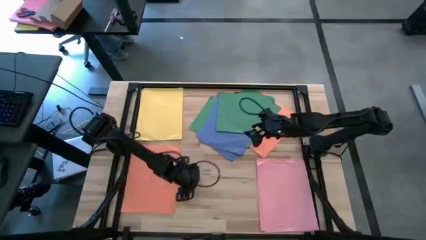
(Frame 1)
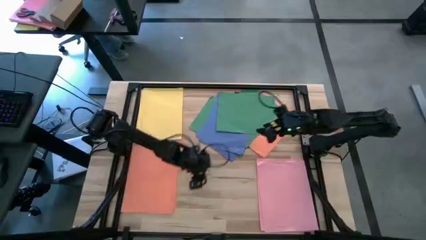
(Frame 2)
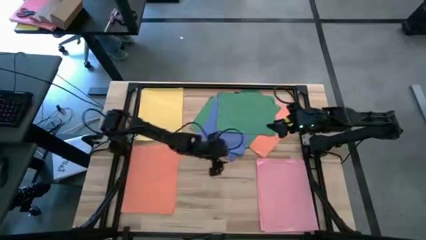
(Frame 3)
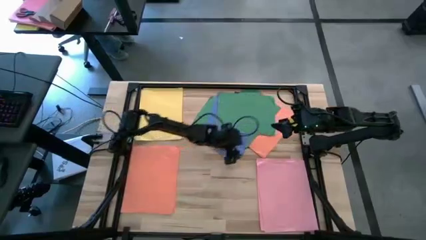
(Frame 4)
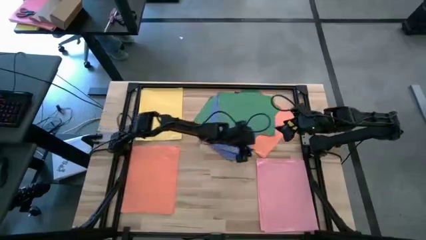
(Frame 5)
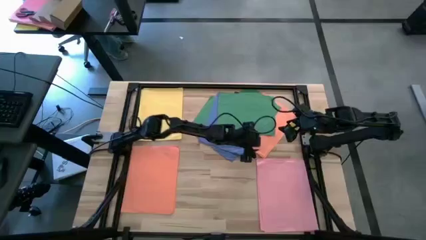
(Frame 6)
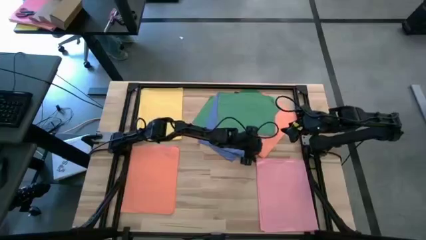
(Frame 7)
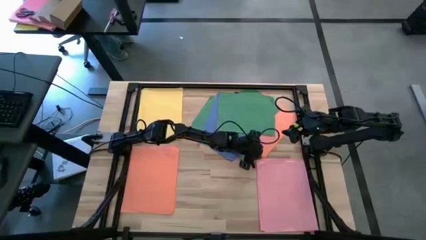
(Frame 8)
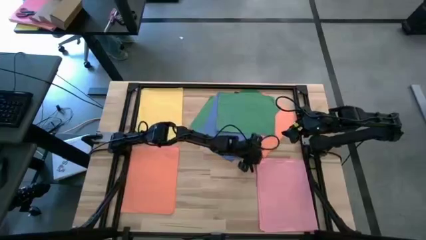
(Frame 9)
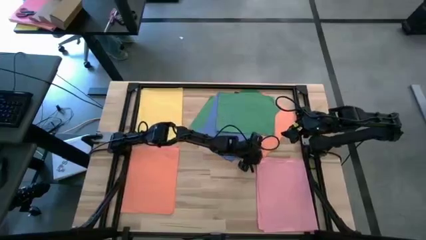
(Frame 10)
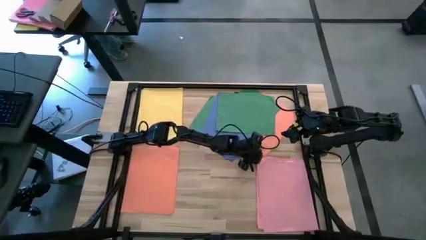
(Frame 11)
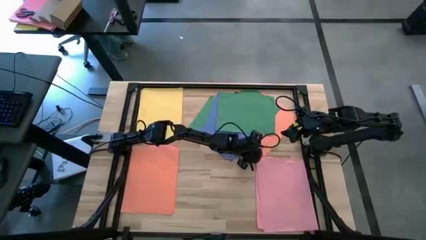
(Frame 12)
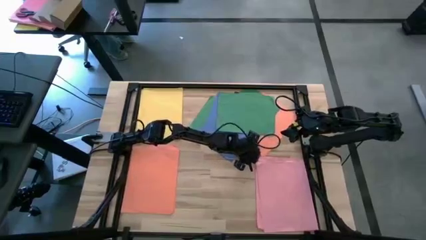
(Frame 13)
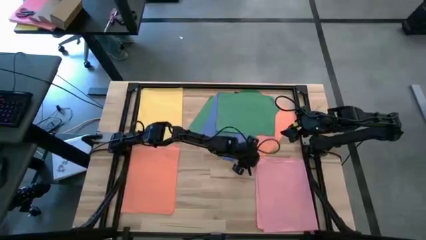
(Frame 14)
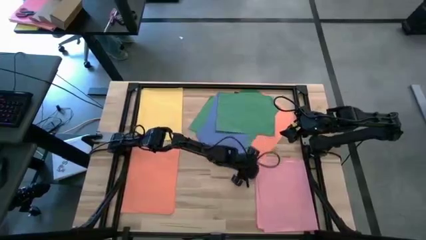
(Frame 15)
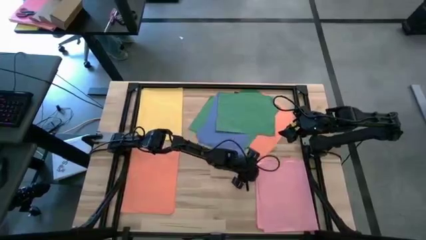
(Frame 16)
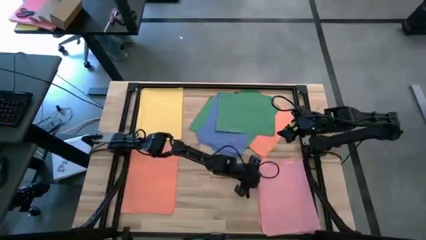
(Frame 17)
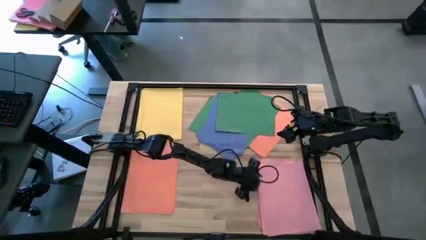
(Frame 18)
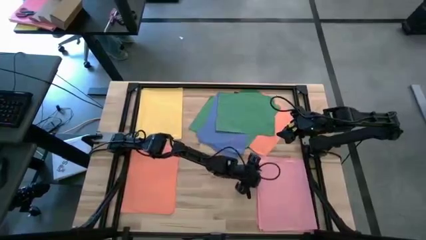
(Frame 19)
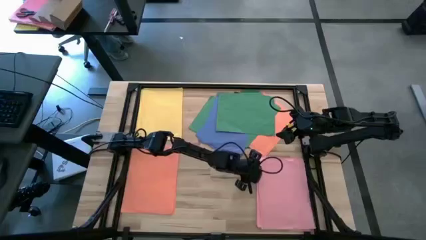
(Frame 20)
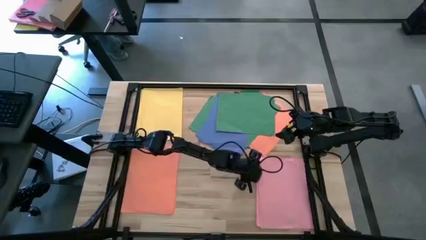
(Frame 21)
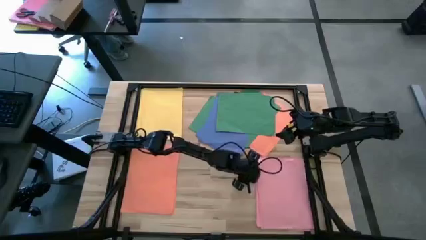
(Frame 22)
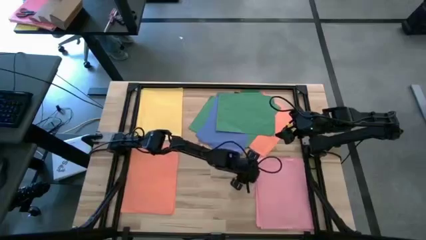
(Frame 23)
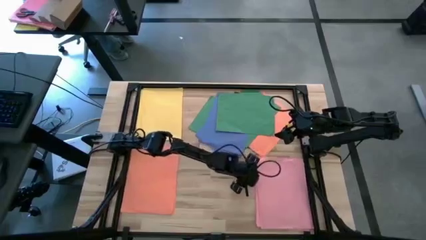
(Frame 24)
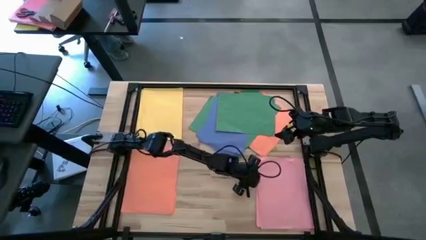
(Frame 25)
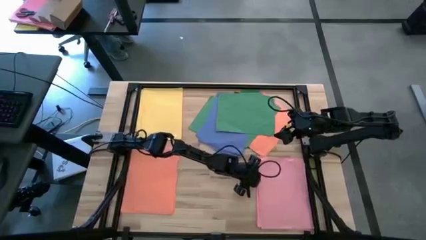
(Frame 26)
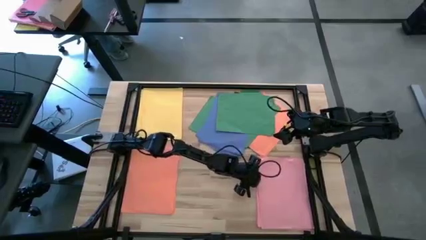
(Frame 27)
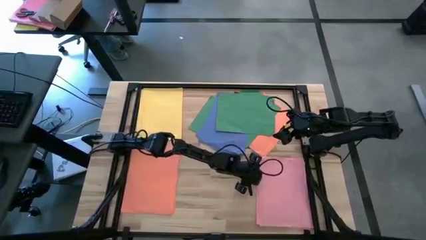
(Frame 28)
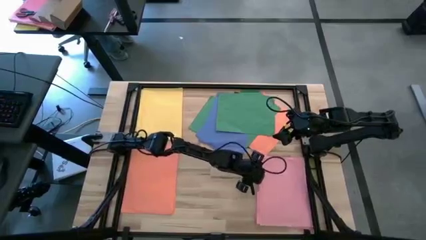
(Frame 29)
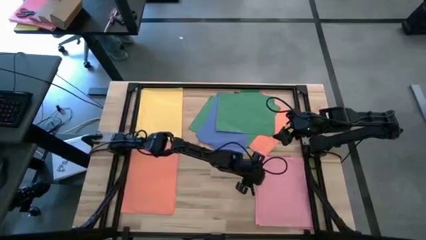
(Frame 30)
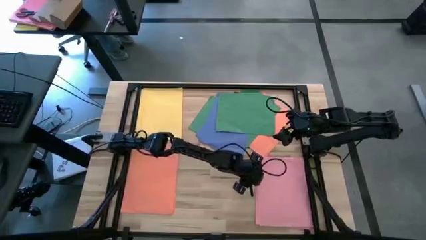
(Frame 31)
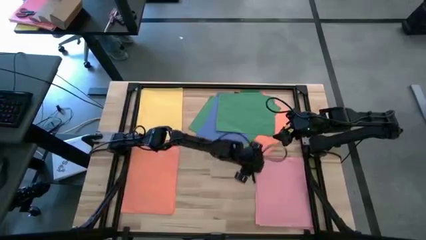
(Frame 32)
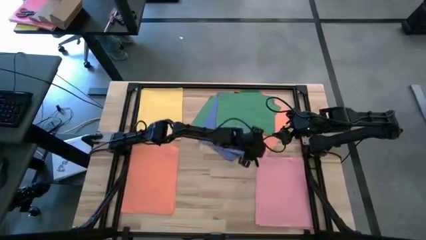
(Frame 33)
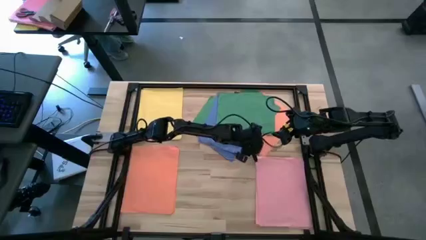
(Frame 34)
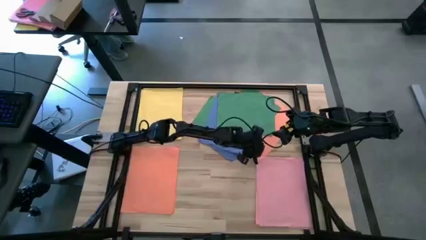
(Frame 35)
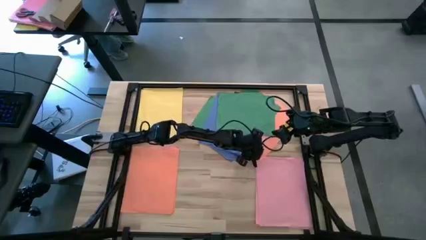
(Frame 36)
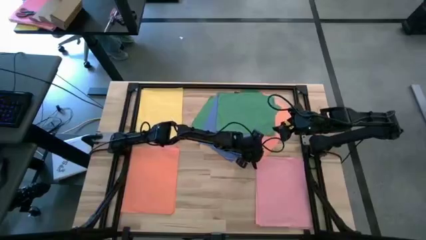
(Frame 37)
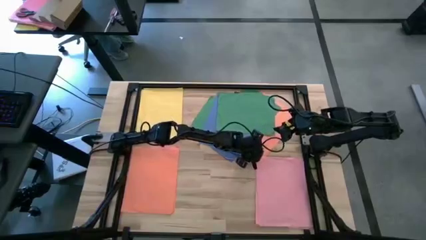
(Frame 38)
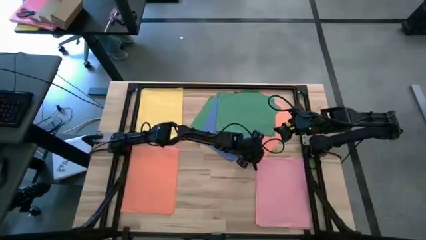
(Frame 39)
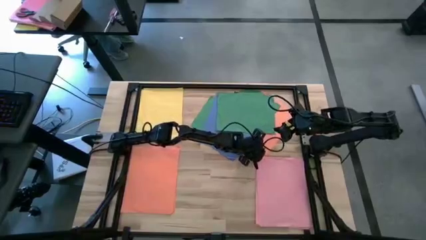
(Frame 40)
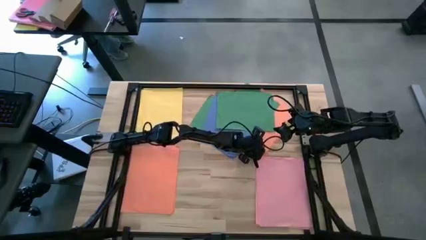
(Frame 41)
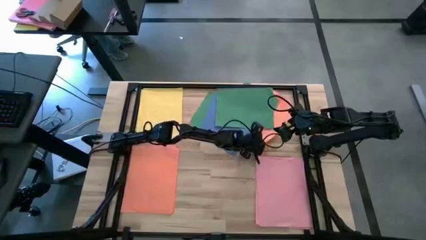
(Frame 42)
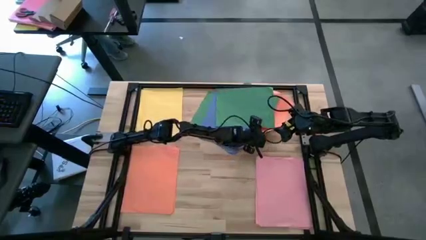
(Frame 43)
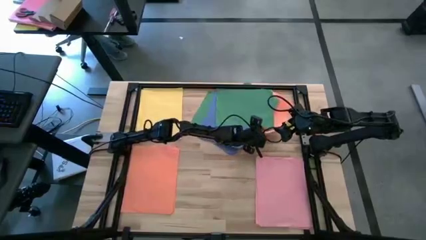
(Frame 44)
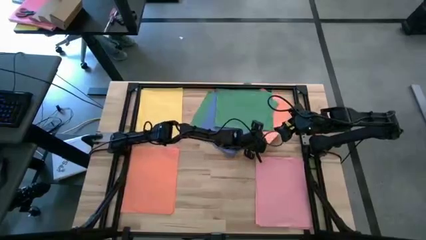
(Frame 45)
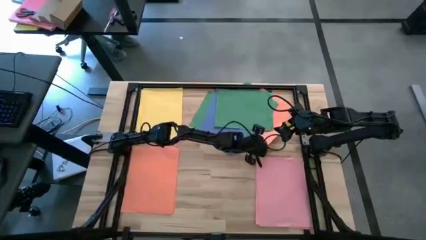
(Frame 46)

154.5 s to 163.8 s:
Task: Organize paper
Stack the orange paper on top of the stacked orange paper

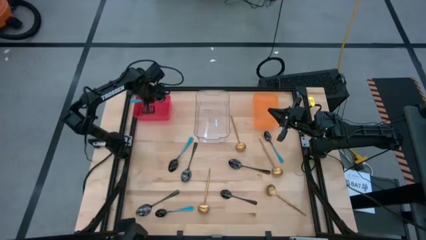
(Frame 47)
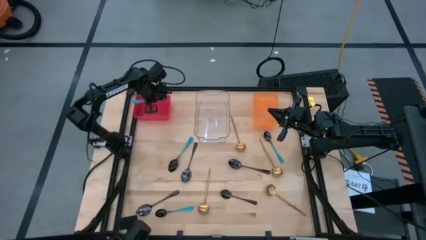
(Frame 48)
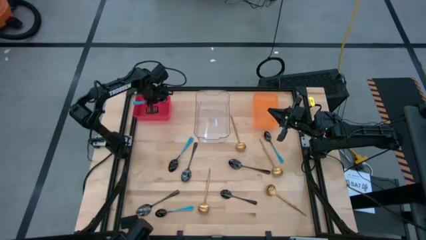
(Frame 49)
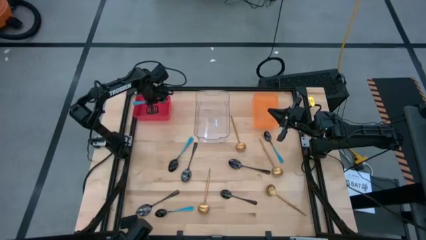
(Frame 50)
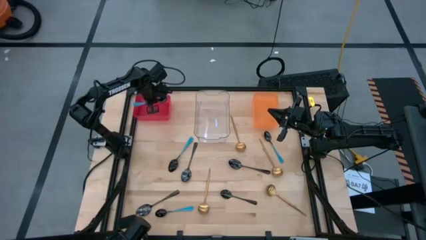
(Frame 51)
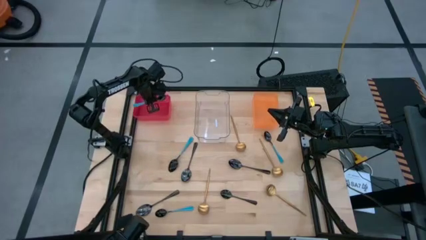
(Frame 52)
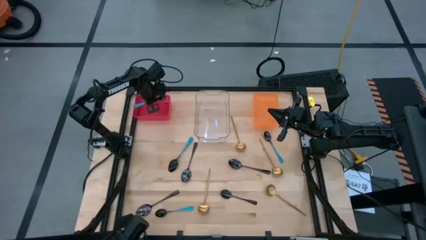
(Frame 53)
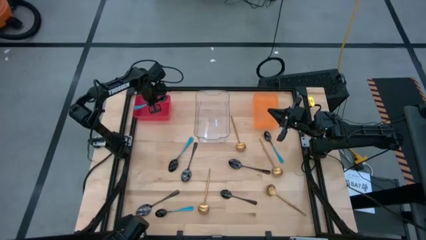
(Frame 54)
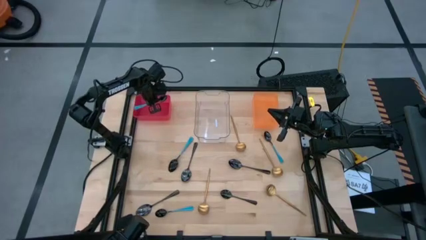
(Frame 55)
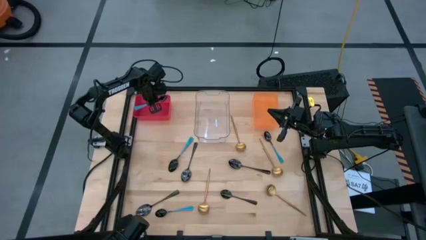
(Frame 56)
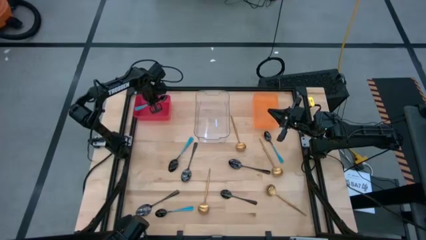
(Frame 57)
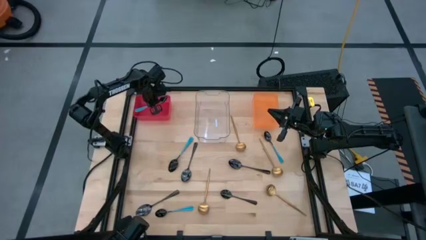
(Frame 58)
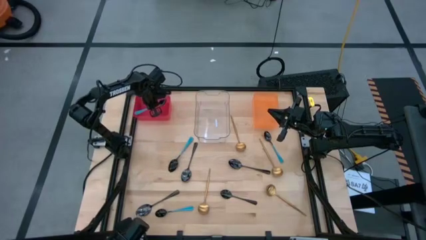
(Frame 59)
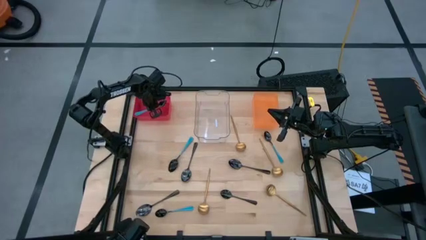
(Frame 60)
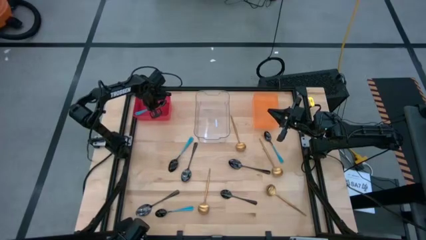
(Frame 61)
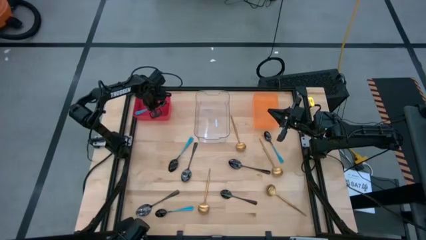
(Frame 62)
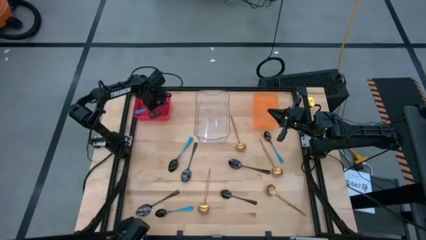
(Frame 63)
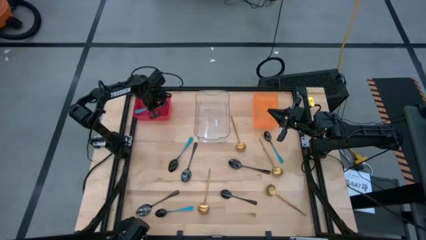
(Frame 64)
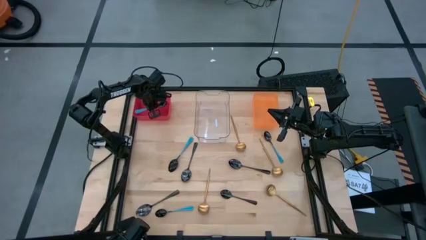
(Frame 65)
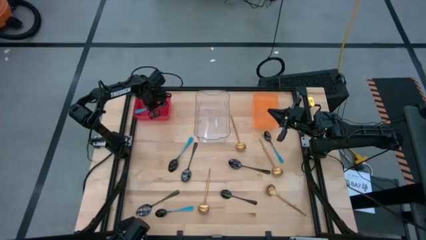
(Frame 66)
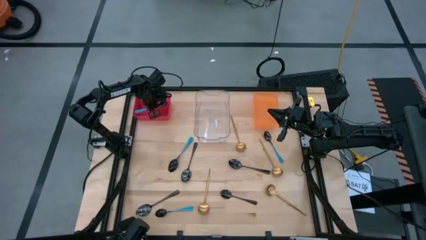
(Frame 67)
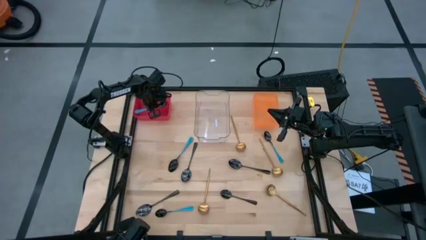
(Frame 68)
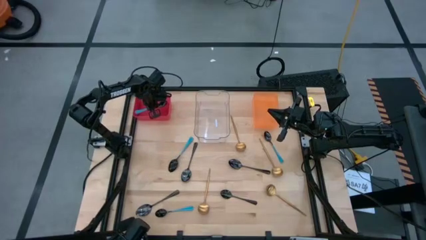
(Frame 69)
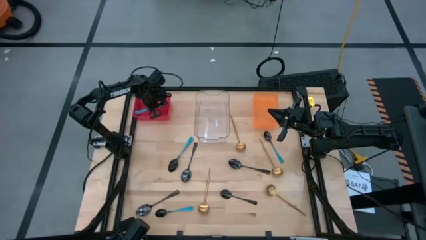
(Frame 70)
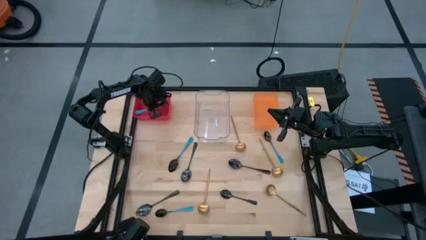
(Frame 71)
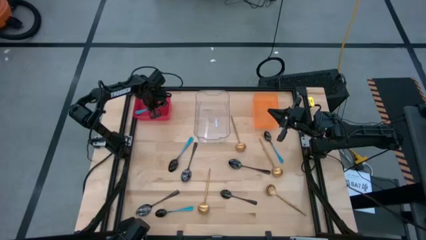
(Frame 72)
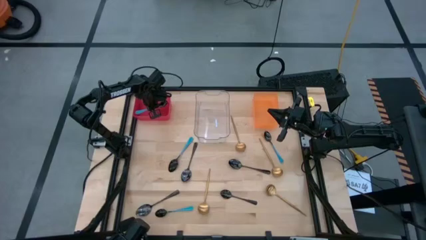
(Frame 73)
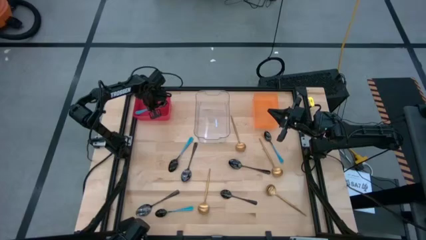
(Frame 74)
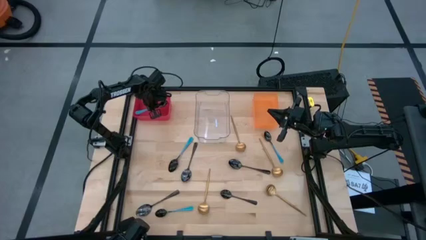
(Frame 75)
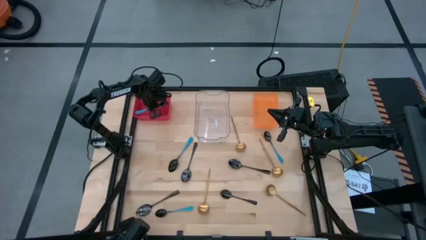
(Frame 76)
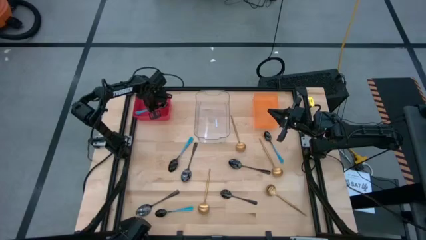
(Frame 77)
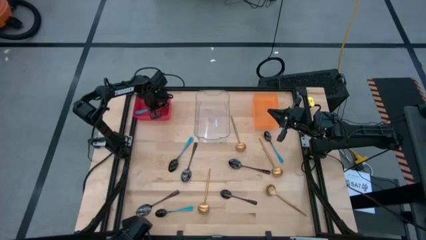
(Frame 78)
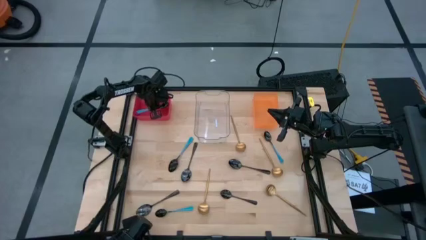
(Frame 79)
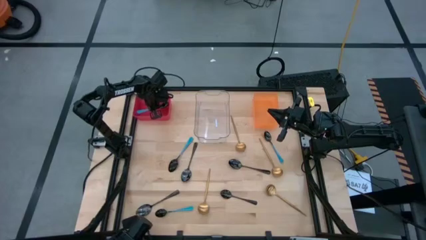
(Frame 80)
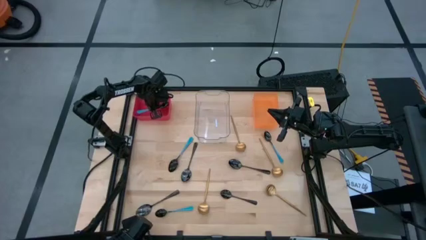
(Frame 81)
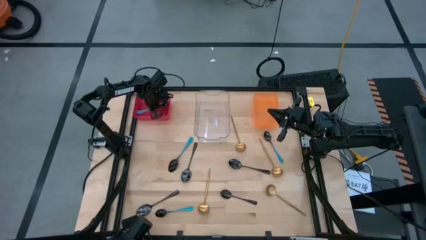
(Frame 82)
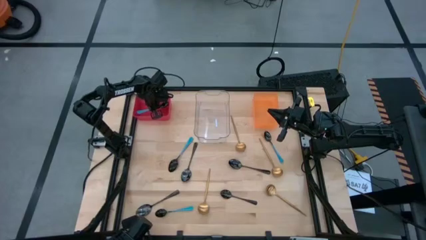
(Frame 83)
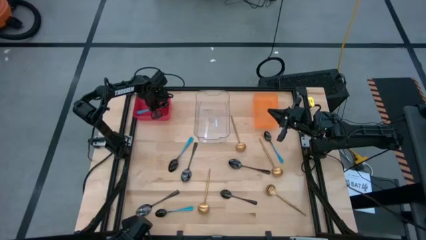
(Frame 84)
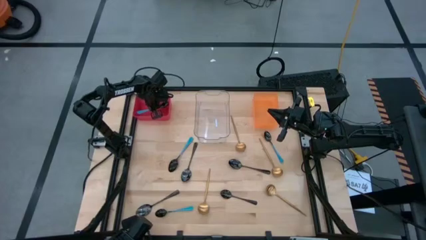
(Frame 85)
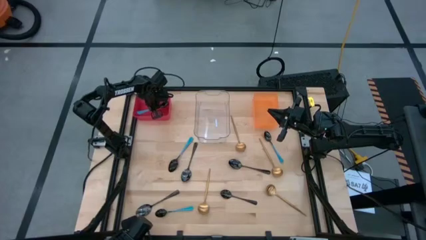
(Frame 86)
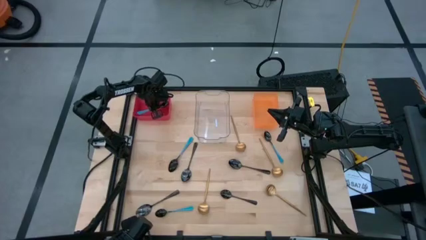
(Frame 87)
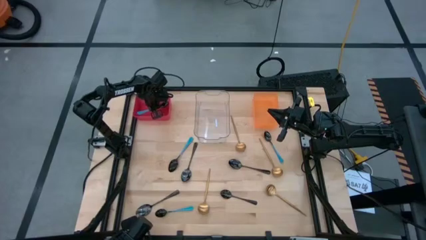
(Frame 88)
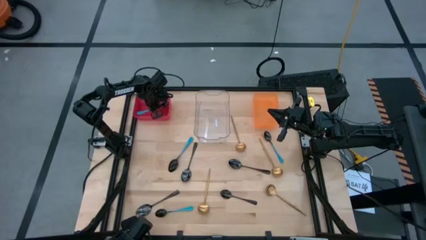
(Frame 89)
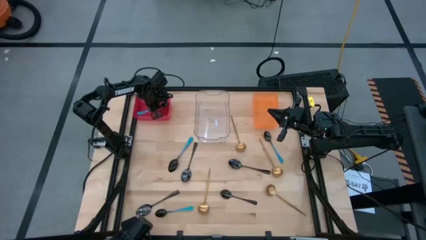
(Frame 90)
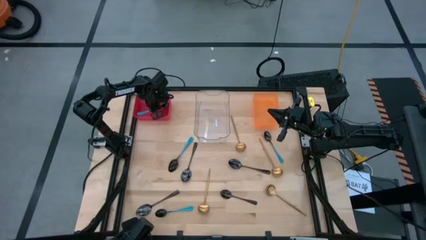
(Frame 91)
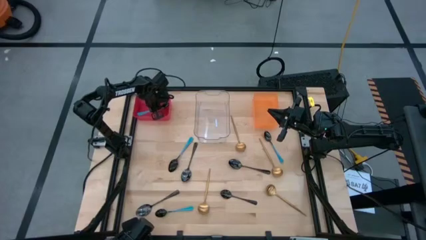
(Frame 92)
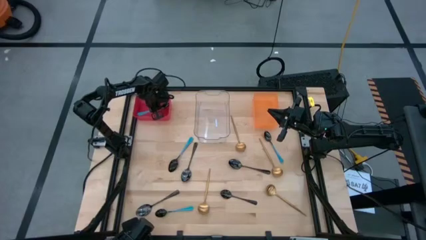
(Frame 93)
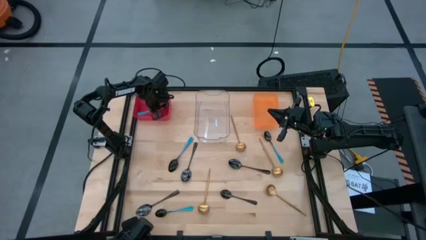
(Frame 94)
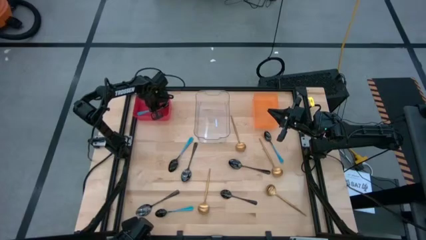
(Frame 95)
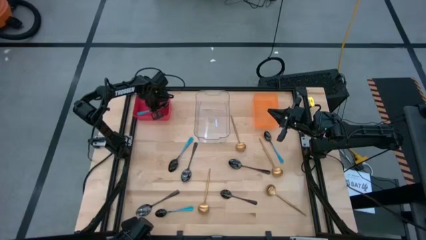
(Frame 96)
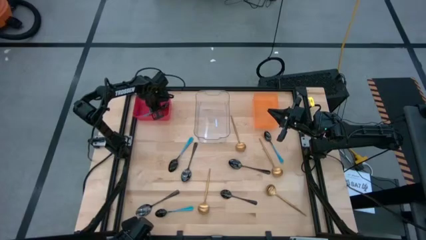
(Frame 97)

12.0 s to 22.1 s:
Task: Sort silverware by color (type)
Put the blue spoon into the red bin
